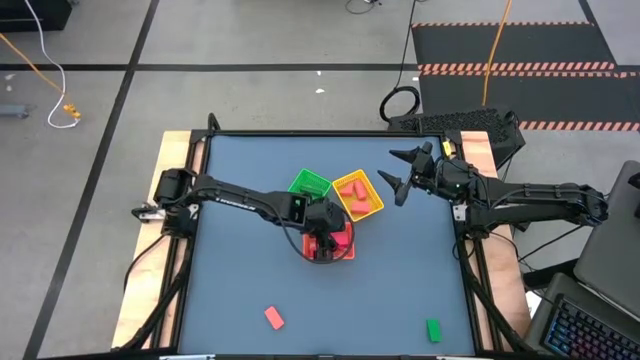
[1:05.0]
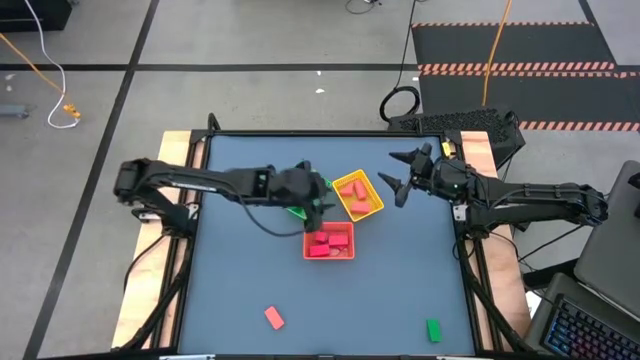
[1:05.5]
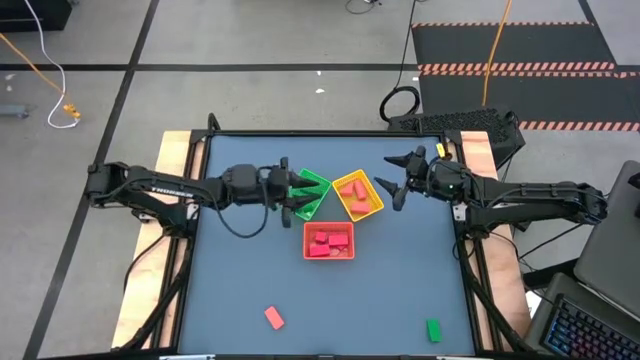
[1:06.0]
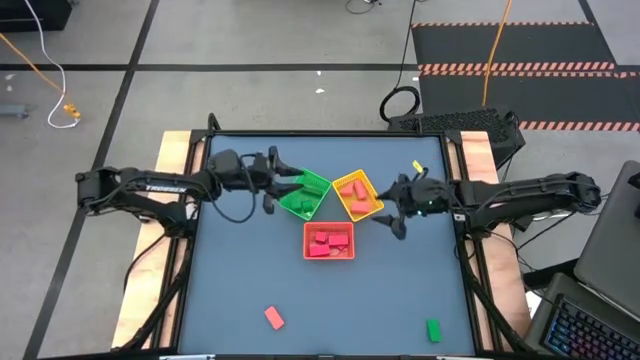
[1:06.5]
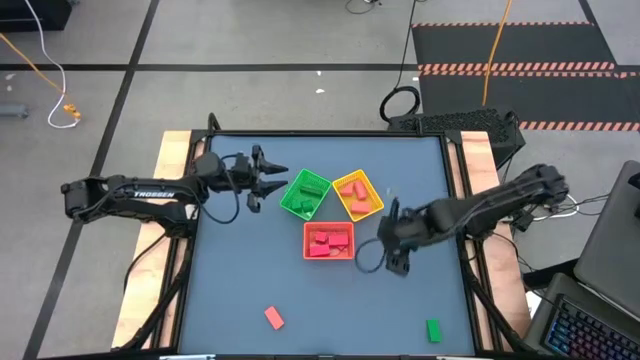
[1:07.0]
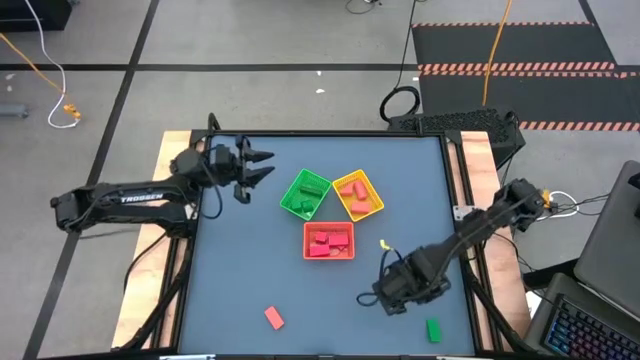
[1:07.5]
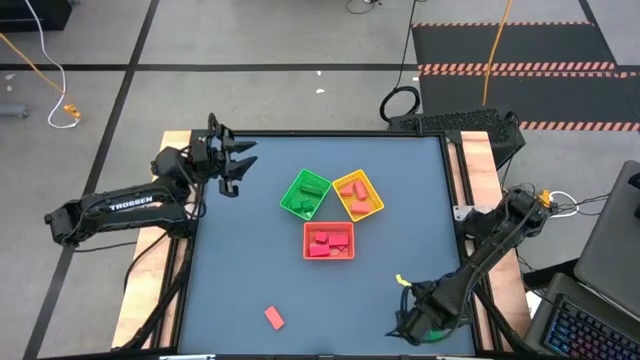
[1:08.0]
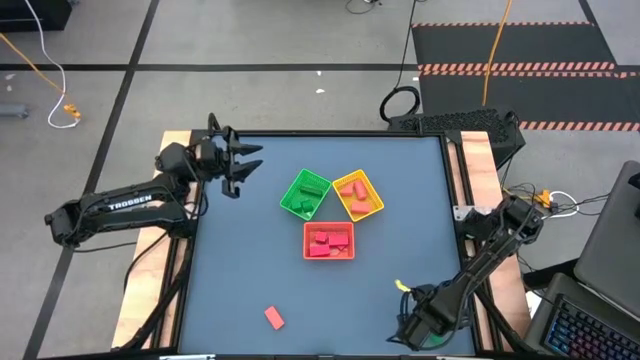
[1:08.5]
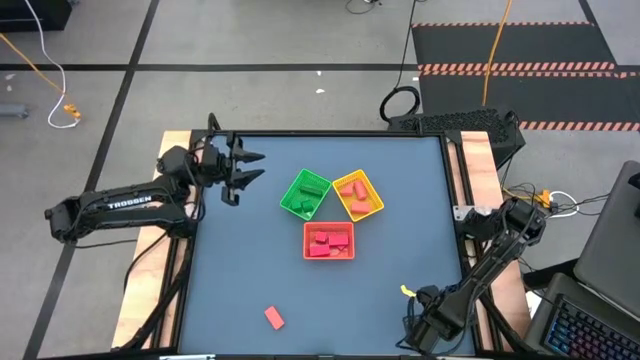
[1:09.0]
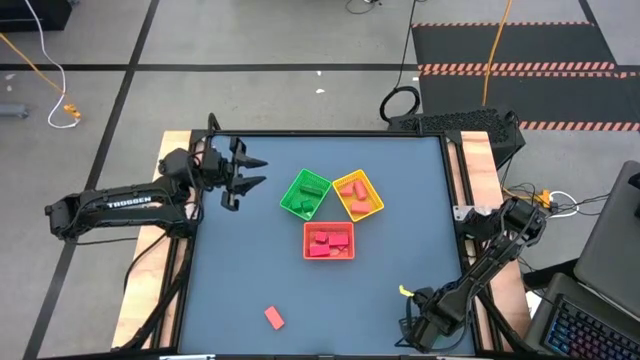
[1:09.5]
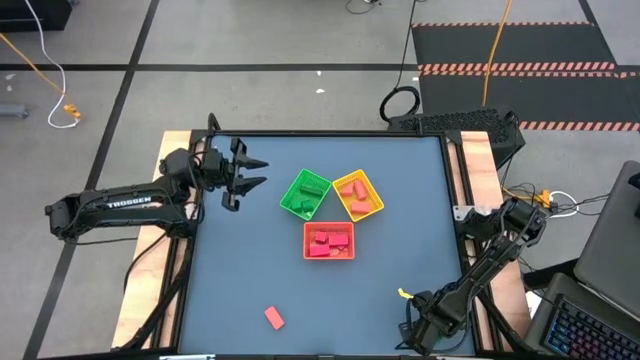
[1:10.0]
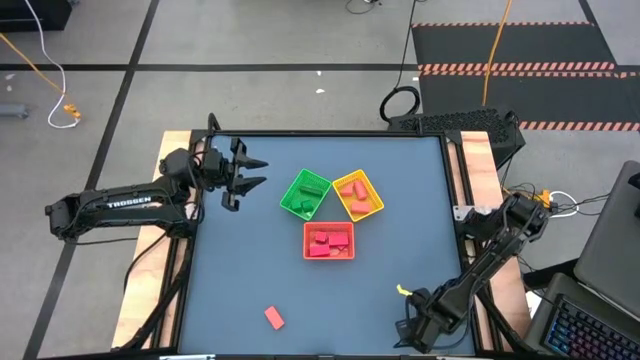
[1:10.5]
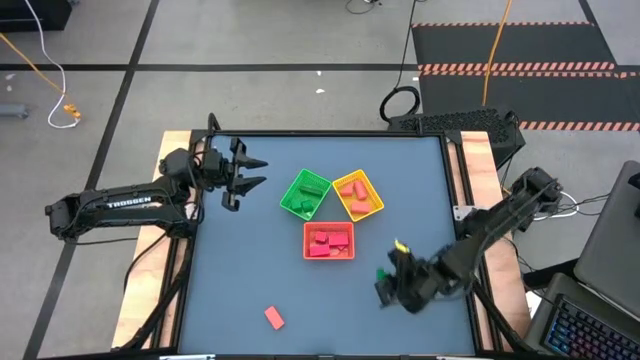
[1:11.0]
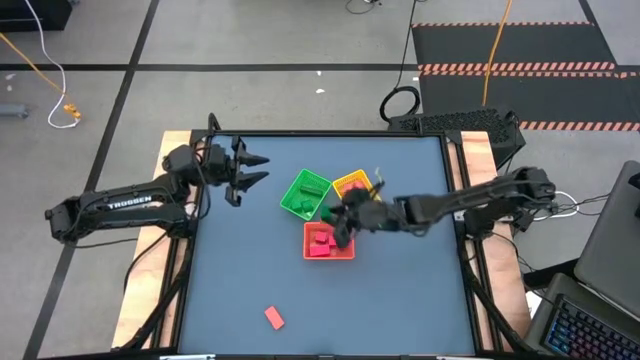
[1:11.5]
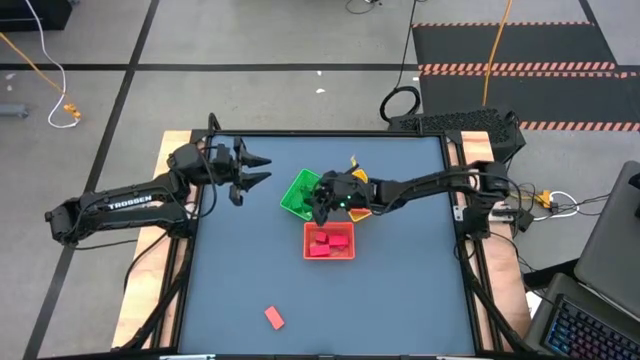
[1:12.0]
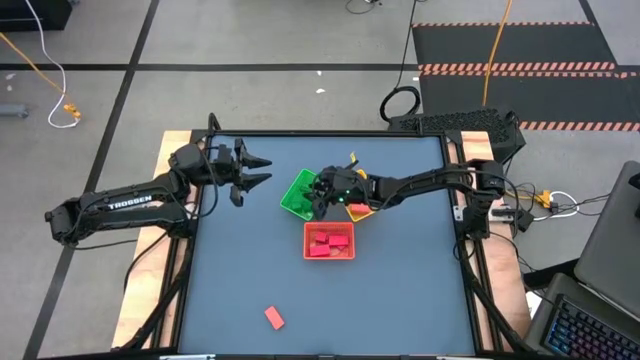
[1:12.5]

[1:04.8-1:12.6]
Task: Sort & place blocks by color
Put the green block into the green bin

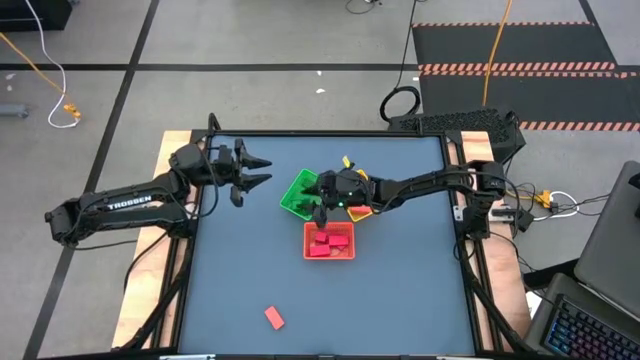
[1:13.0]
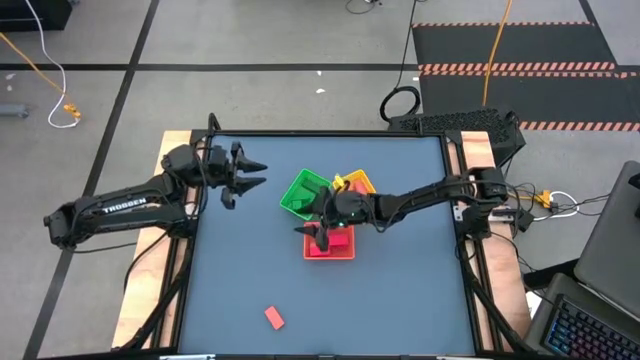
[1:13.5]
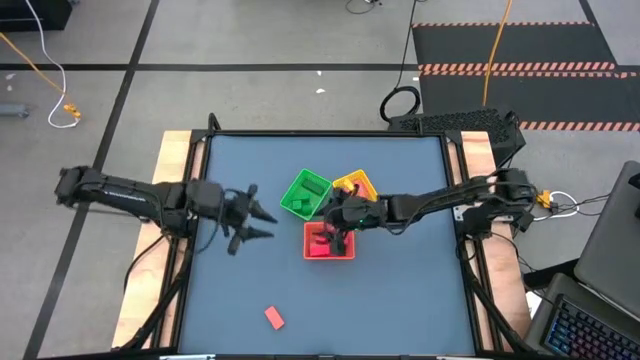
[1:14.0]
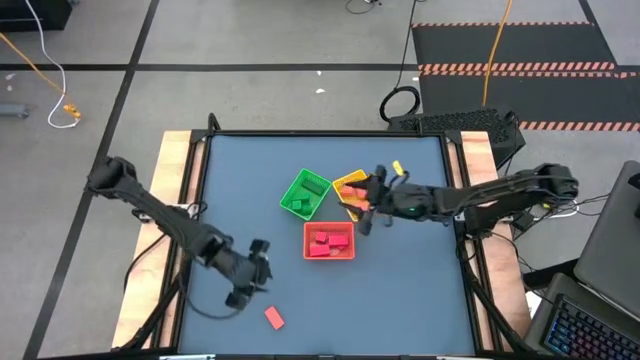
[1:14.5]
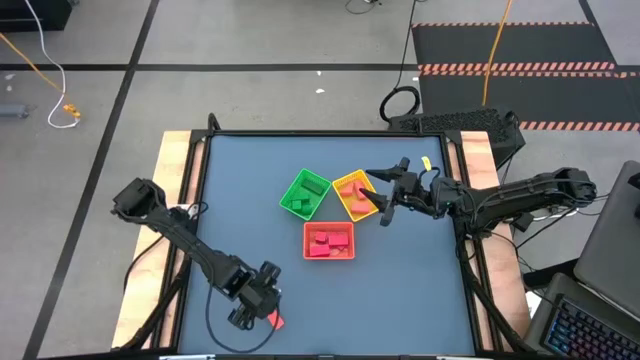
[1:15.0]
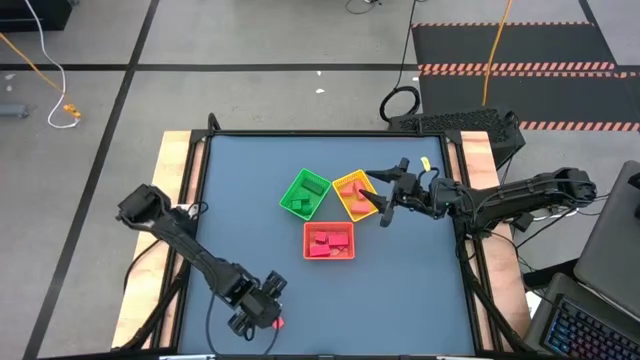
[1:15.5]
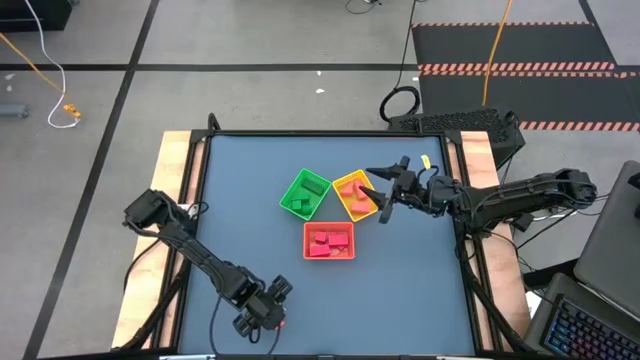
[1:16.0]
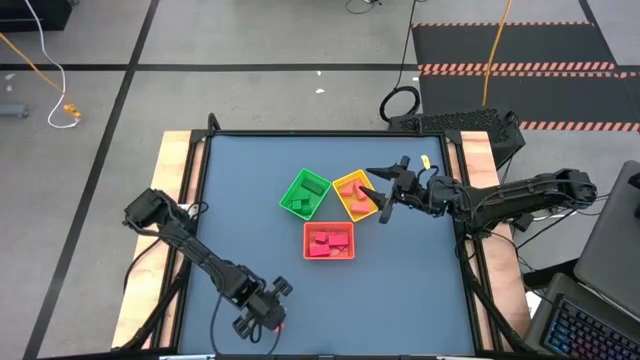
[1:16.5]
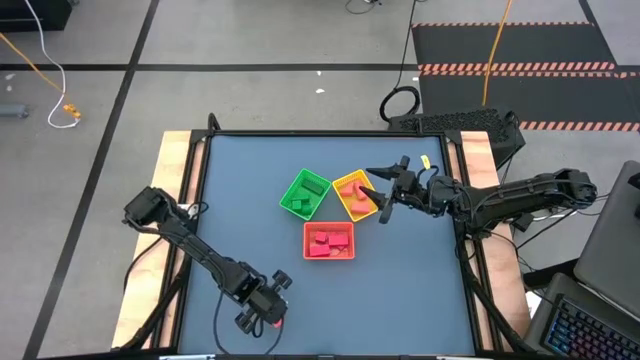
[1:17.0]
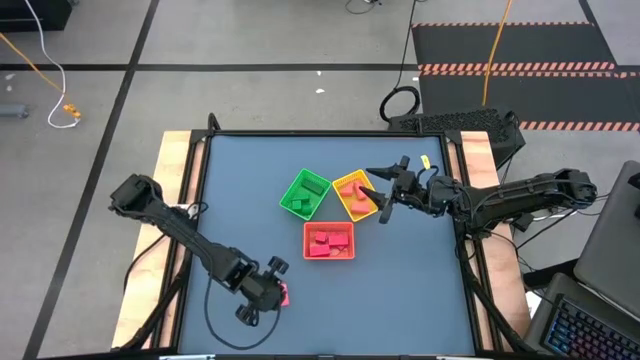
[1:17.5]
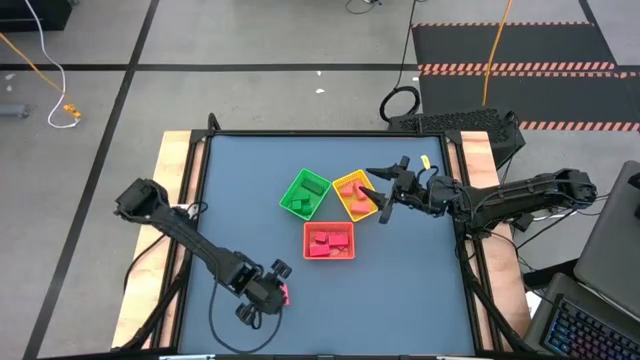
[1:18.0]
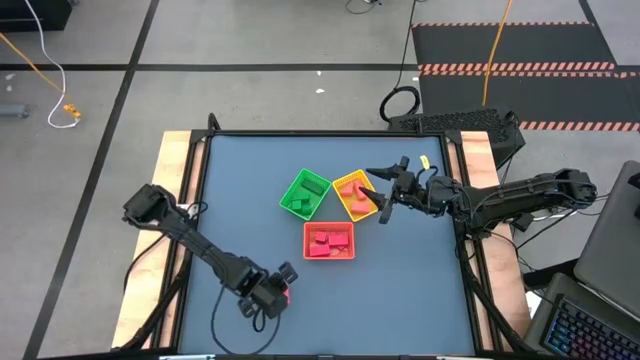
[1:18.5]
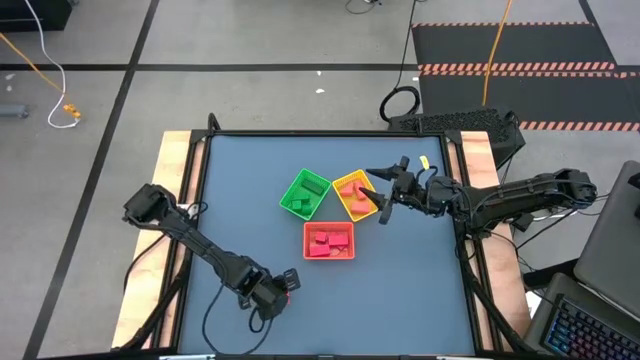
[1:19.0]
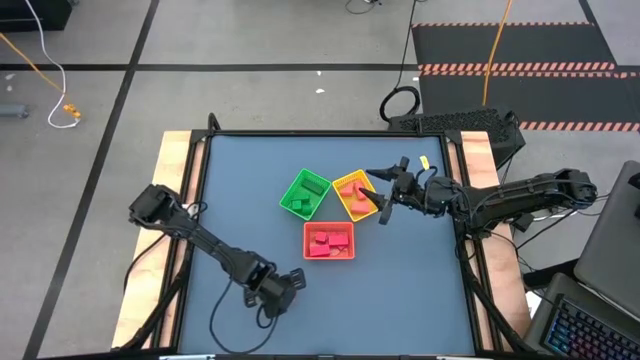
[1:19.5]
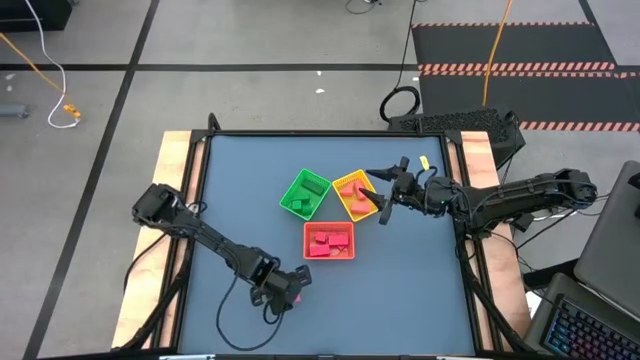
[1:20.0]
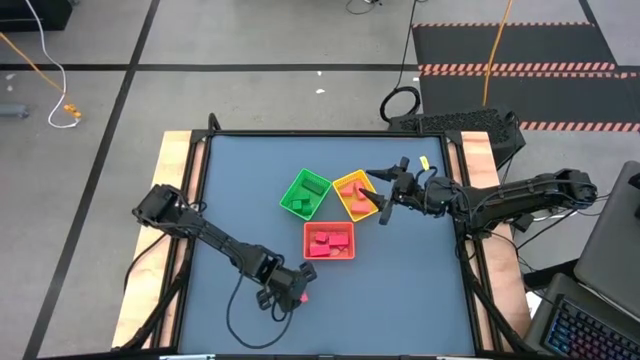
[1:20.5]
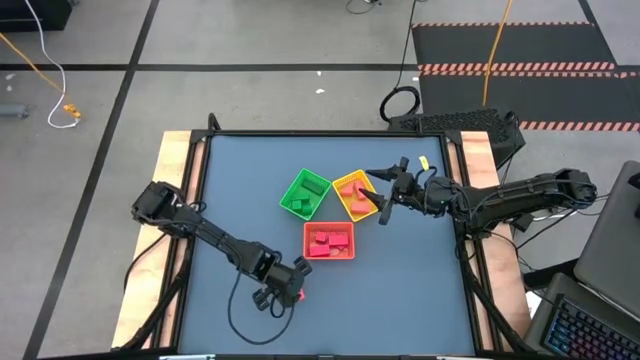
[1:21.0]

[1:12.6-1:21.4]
Put the orange block into the yellow bin

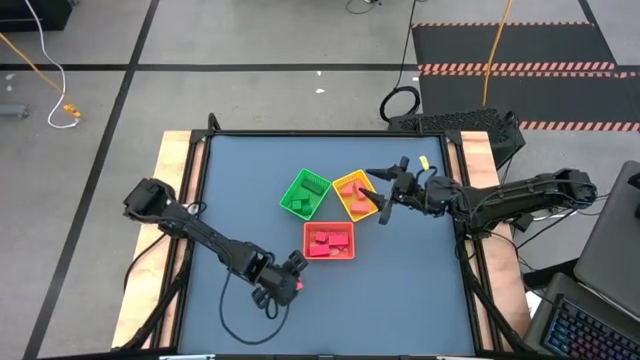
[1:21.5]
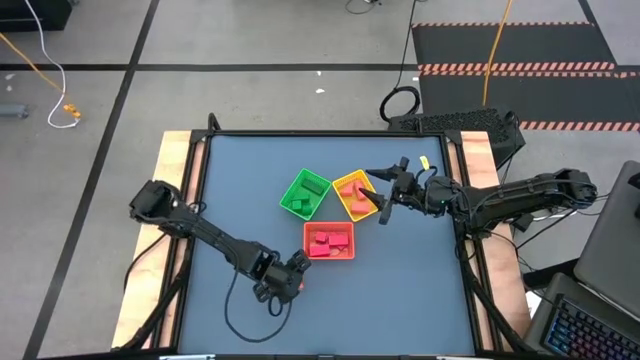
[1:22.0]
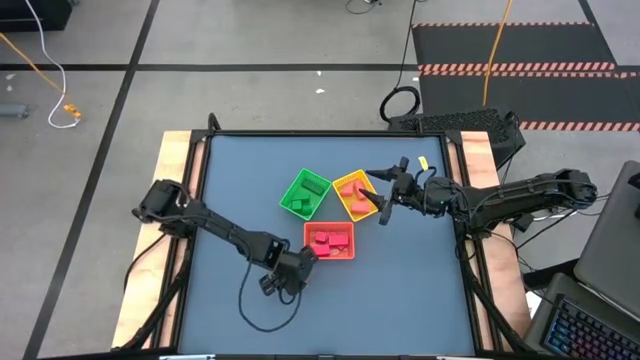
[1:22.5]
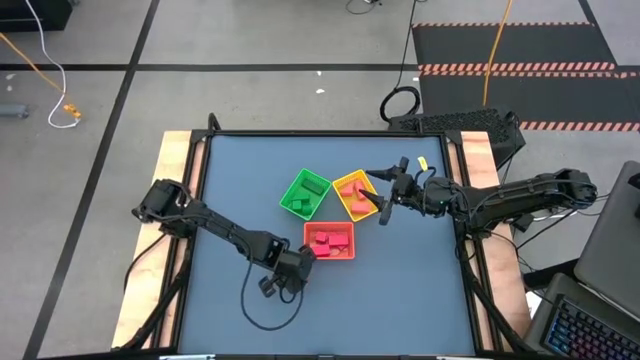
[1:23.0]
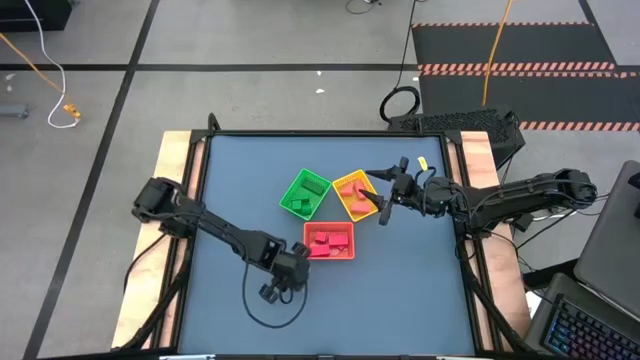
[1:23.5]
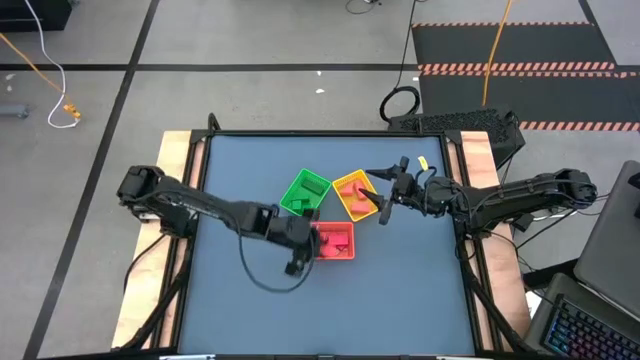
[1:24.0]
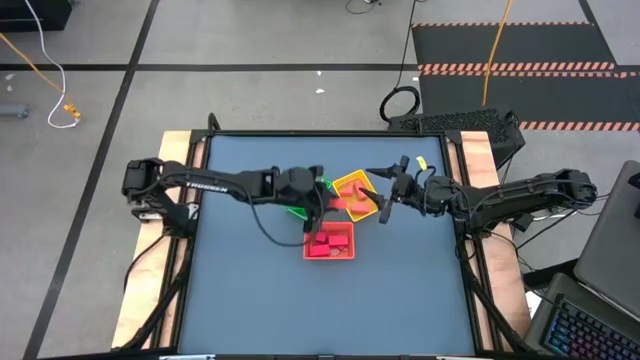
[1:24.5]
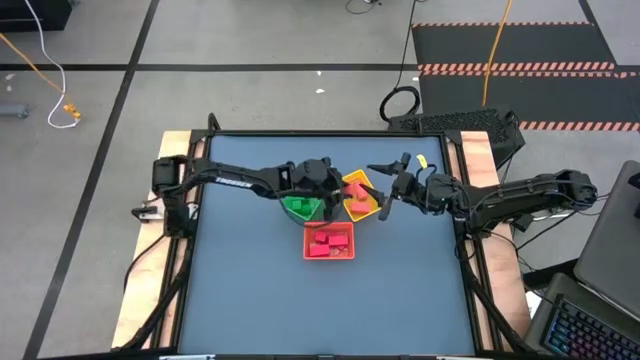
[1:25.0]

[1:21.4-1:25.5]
Put the orange block into the yellow bin

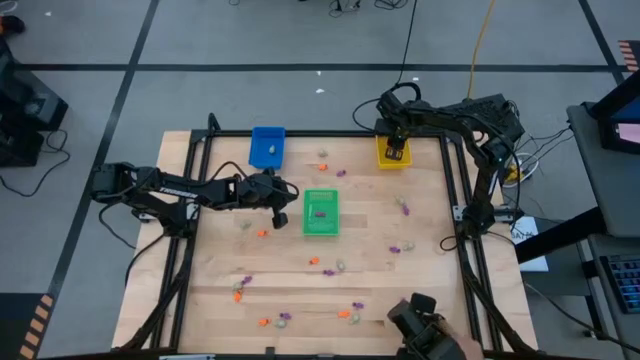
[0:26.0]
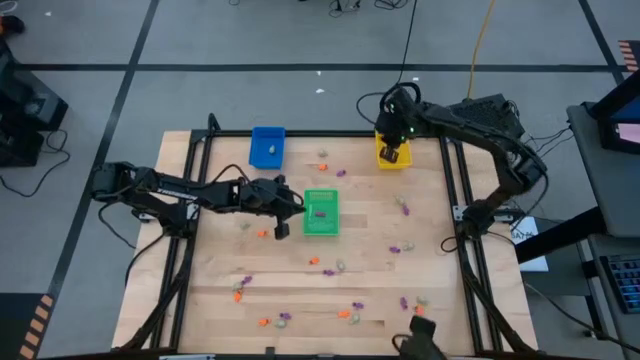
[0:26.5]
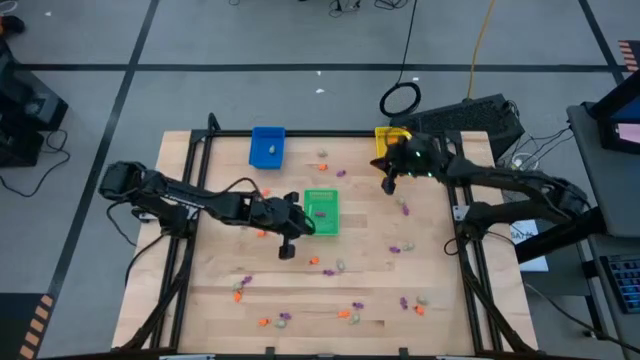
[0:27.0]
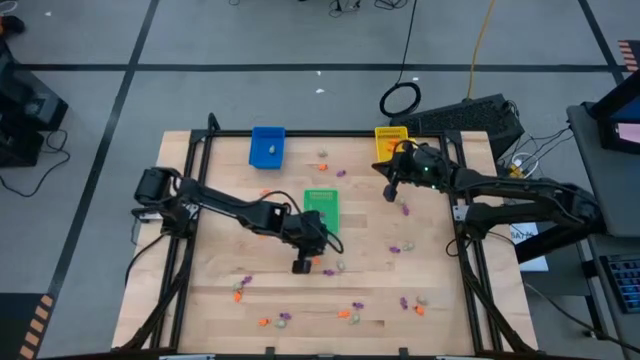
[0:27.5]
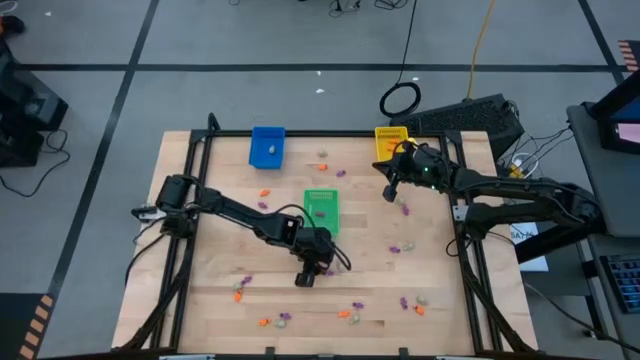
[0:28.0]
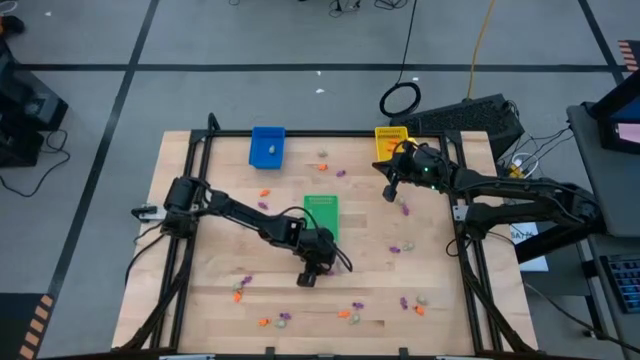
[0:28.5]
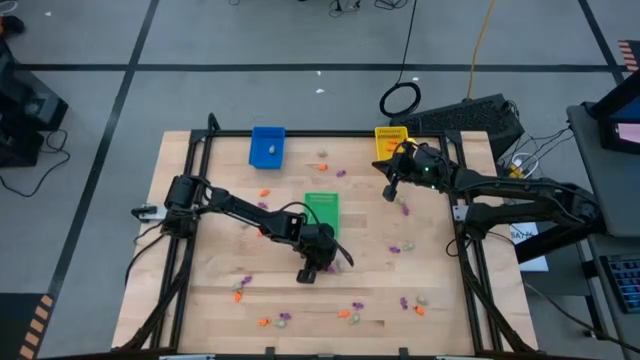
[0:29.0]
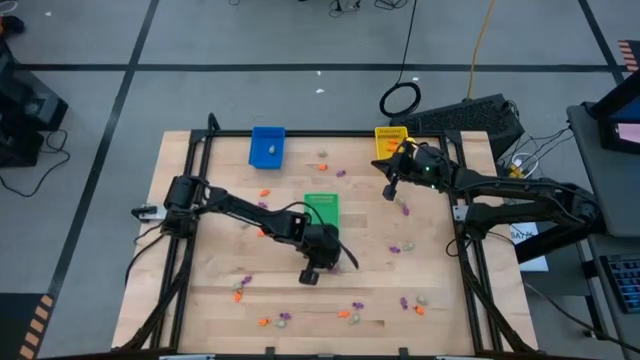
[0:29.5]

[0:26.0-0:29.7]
Task: Sort Halloween decoration
Put the purple skeleton toy into the green bin
